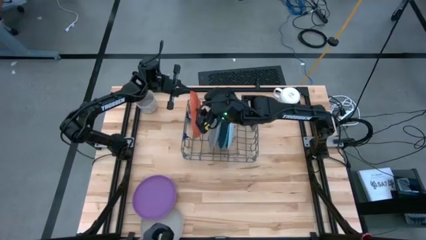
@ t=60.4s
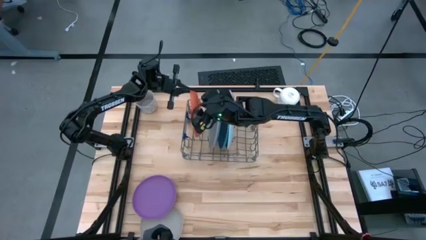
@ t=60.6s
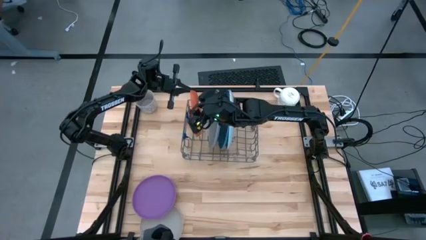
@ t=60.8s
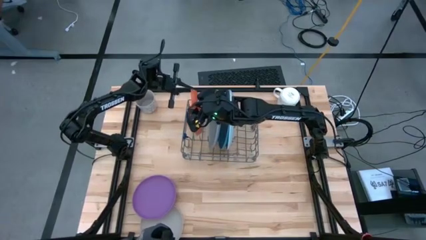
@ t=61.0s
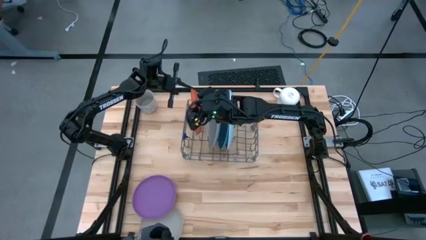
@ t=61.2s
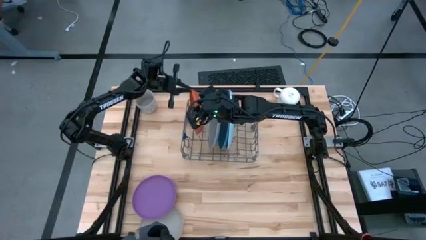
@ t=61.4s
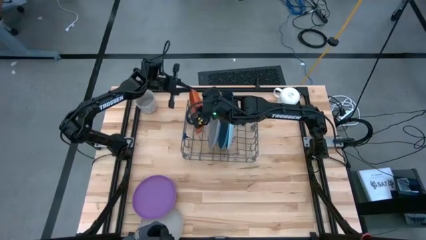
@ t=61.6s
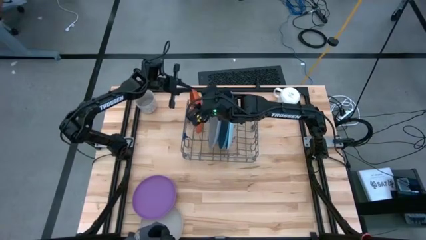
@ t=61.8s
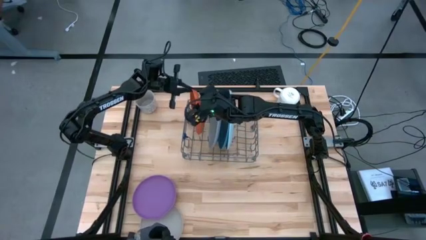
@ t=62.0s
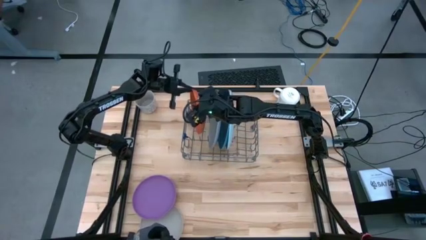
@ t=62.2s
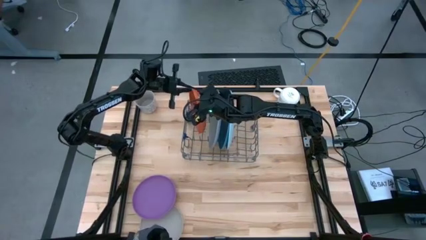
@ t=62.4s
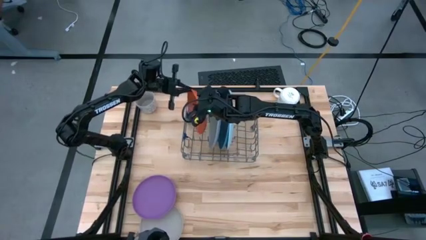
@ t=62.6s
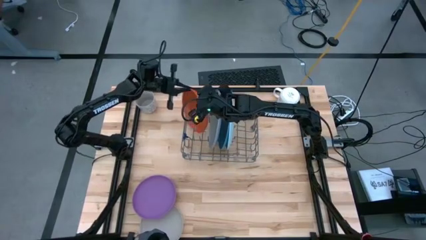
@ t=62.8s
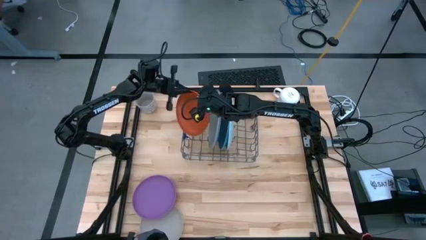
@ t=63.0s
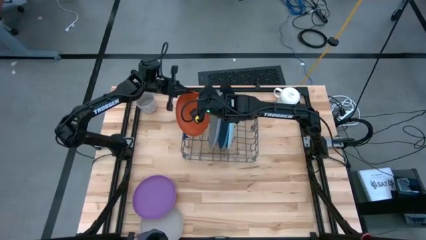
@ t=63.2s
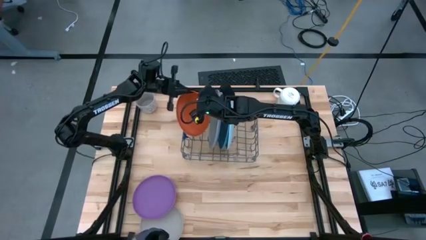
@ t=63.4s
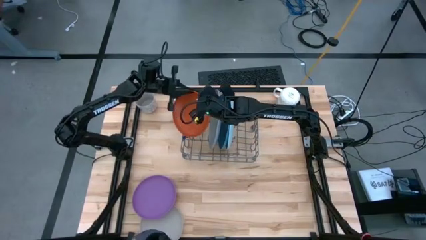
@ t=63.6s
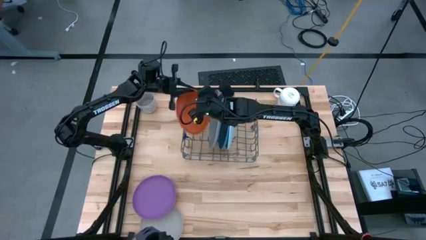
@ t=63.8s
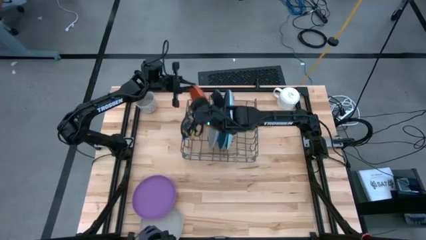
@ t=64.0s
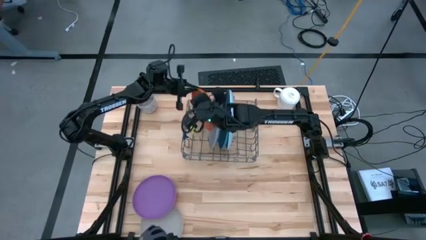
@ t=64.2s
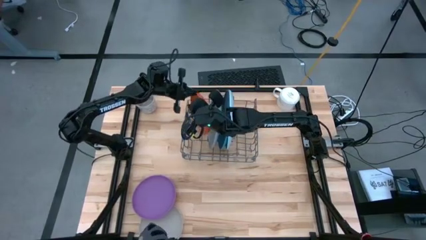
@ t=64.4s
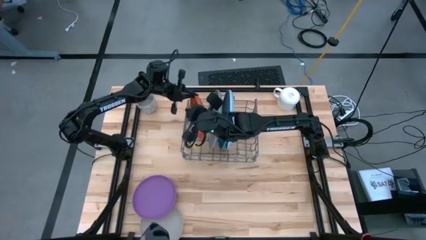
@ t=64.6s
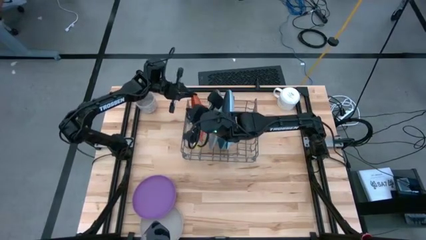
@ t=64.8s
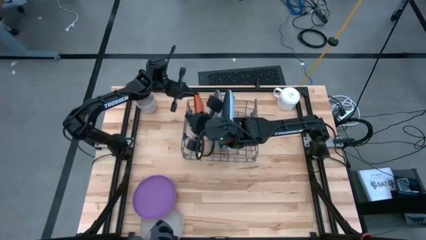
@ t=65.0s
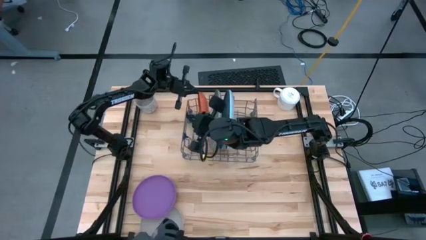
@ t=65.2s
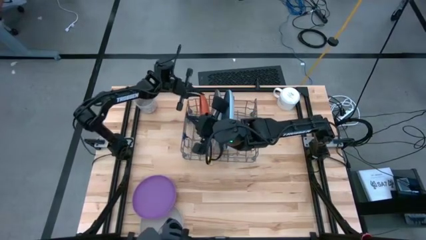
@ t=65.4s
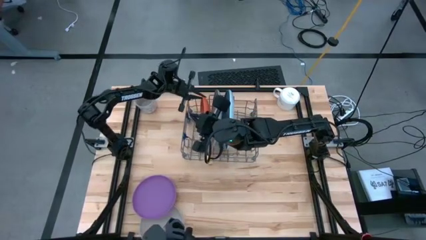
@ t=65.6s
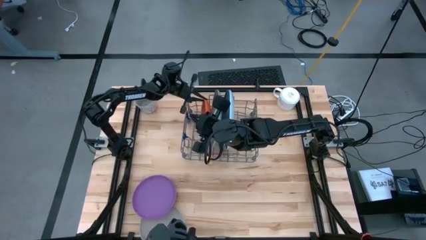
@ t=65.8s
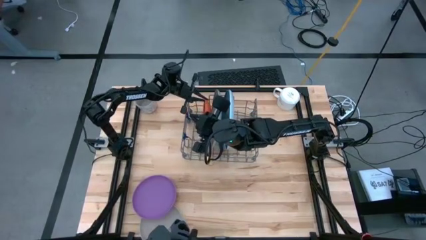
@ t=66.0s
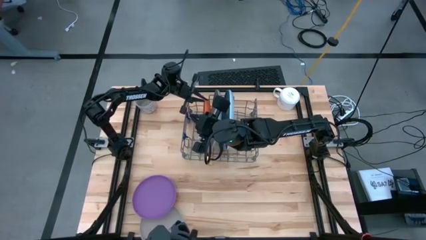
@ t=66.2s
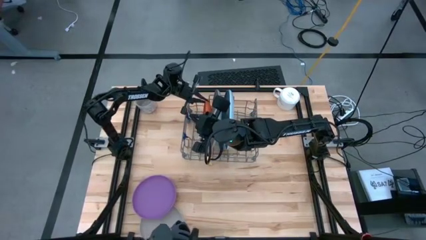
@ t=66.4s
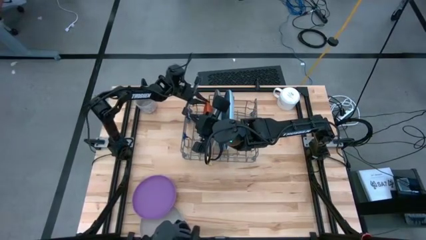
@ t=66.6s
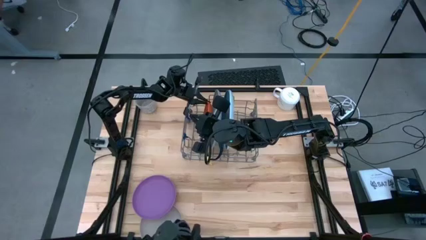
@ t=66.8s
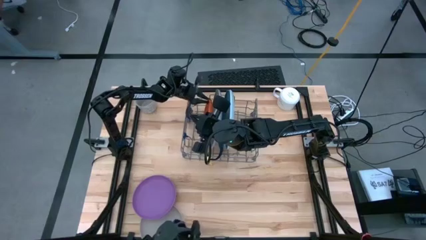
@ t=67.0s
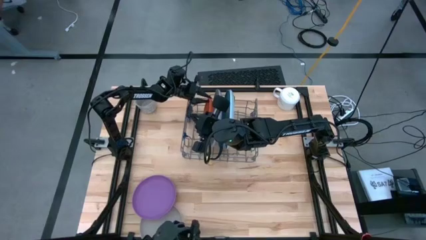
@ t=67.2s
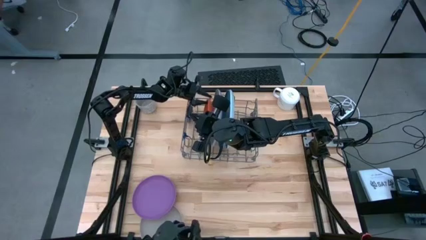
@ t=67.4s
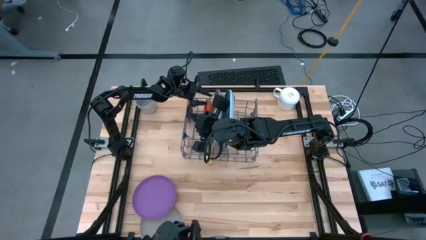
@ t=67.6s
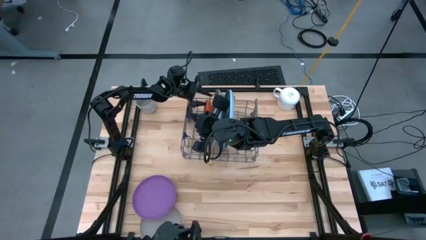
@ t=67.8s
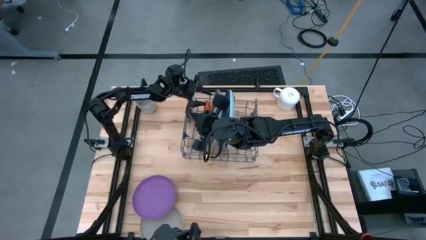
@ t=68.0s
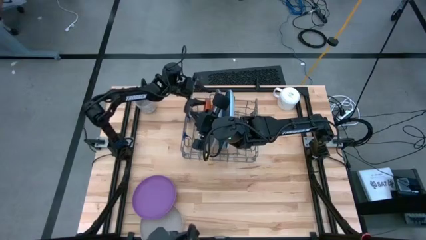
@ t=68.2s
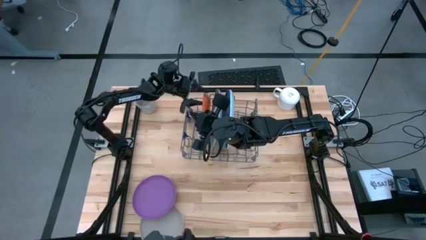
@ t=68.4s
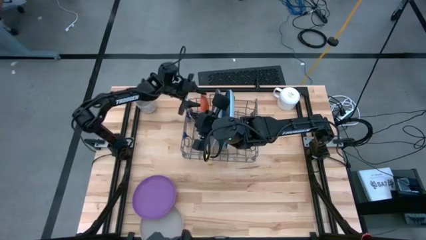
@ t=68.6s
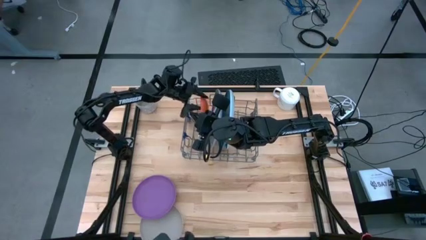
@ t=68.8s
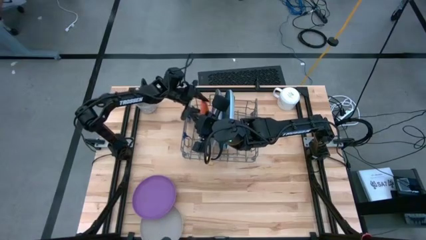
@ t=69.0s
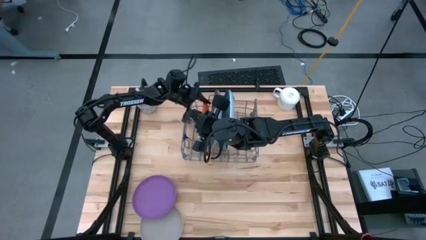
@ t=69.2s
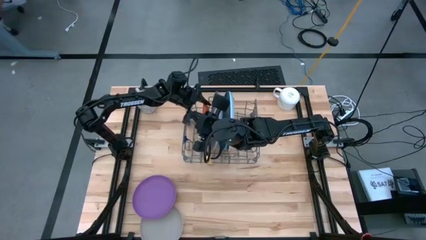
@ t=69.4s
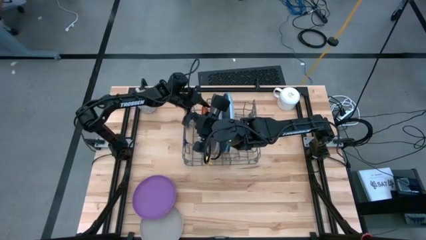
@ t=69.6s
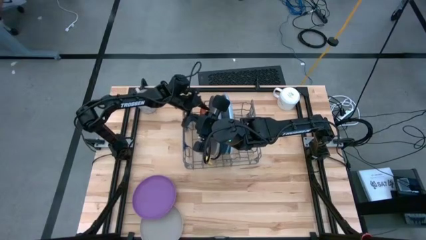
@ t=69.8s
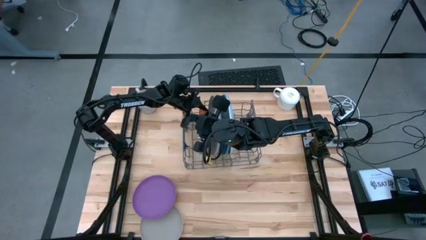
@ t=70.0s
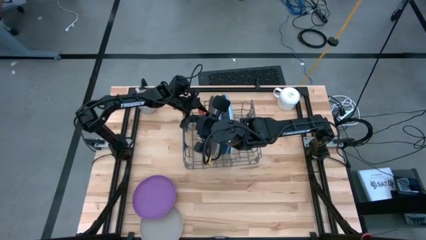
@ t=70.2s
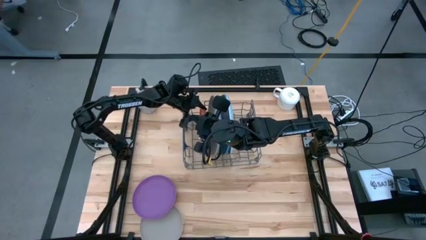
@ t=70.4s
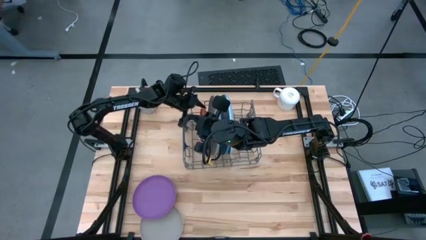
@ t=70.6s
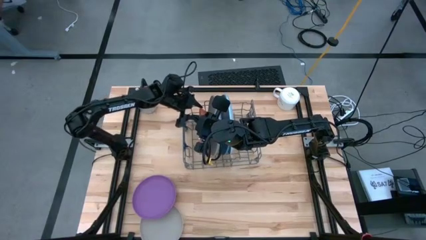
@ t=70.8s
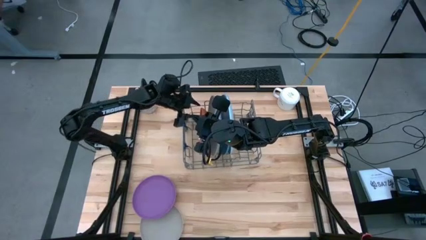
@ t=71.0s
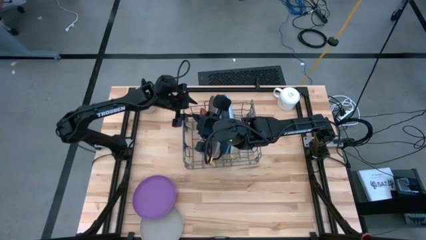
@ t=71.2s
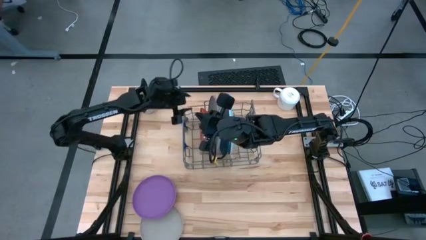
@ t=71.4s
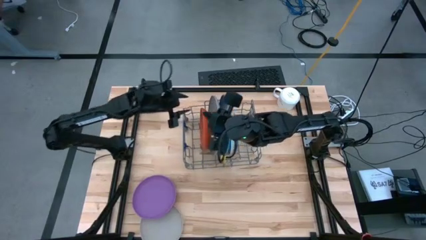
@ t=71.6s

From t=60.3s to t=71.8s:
Task: Sort dishes
Put the orange plate in the dish rack

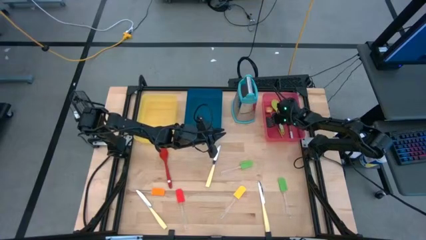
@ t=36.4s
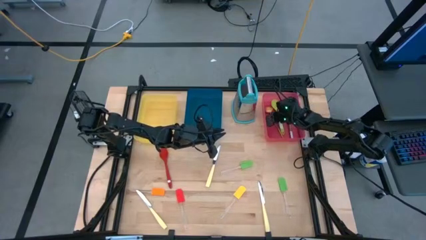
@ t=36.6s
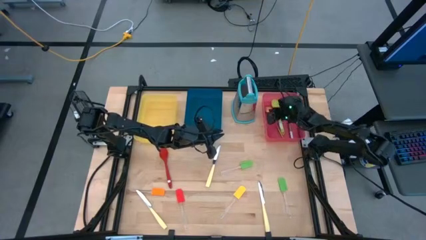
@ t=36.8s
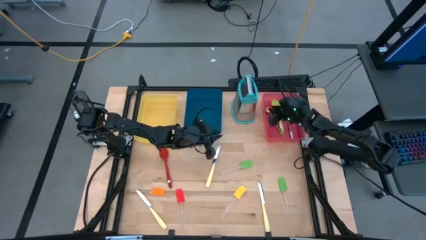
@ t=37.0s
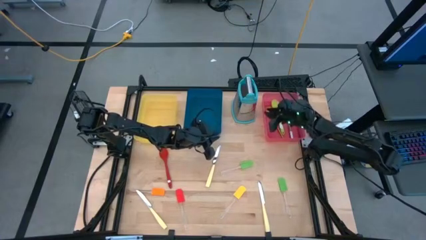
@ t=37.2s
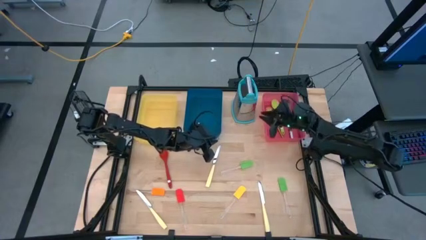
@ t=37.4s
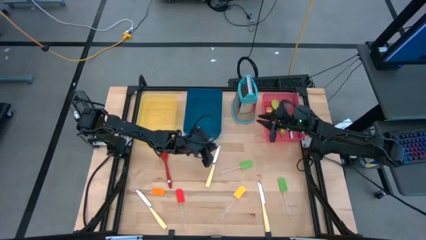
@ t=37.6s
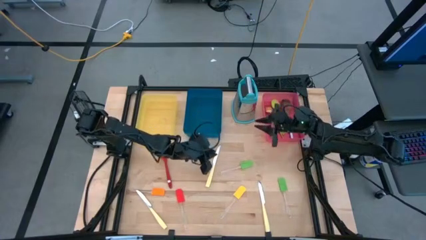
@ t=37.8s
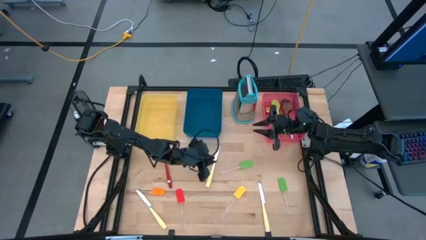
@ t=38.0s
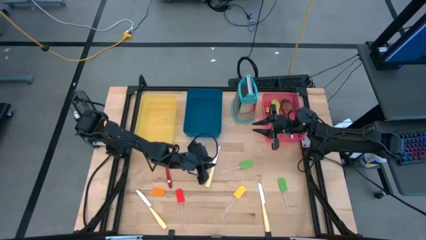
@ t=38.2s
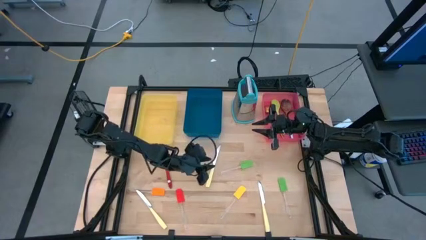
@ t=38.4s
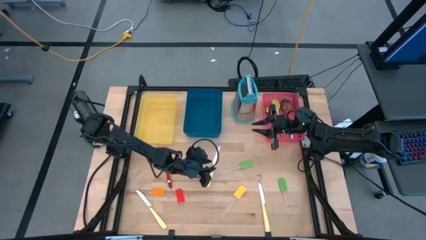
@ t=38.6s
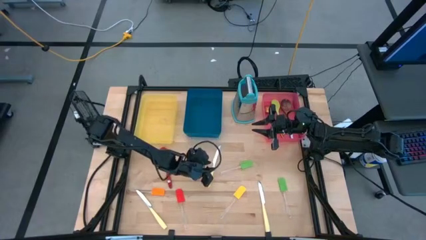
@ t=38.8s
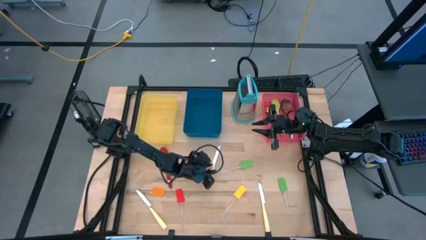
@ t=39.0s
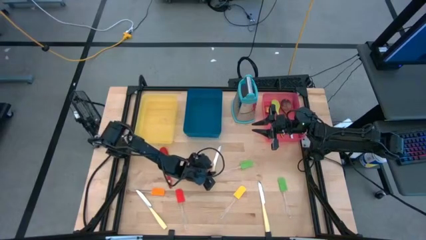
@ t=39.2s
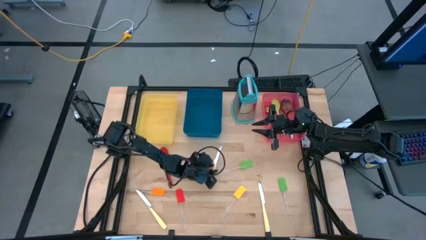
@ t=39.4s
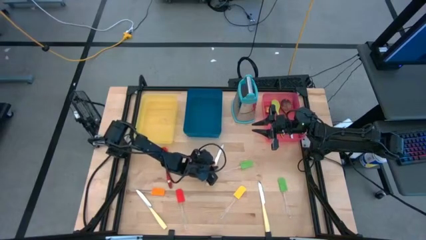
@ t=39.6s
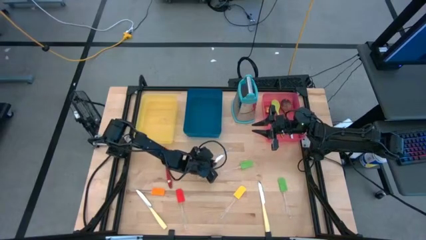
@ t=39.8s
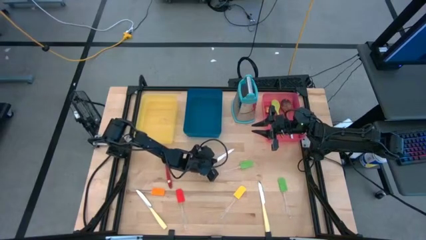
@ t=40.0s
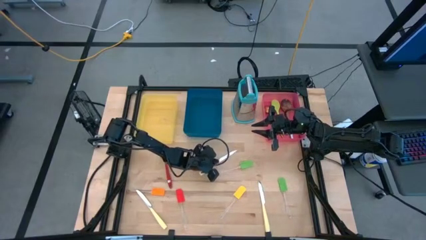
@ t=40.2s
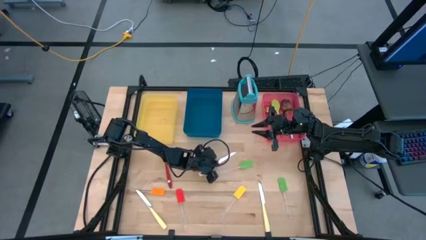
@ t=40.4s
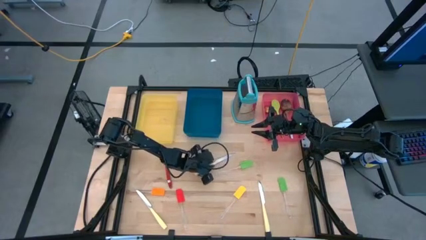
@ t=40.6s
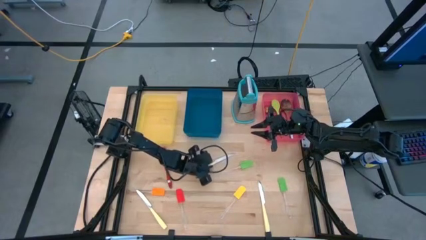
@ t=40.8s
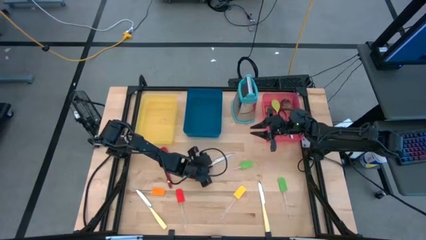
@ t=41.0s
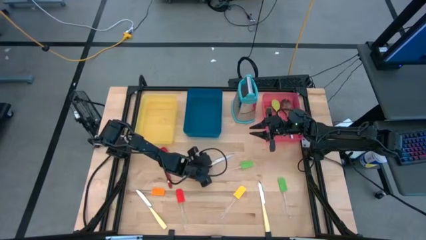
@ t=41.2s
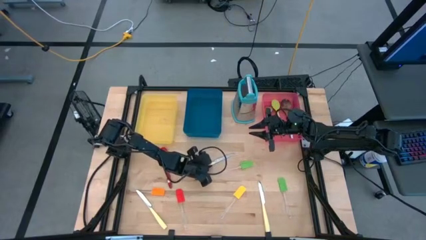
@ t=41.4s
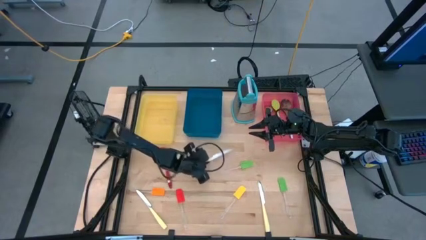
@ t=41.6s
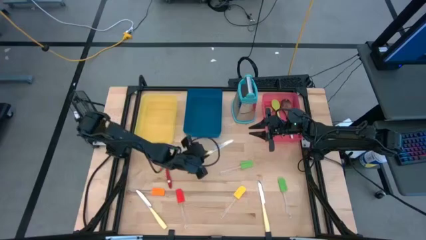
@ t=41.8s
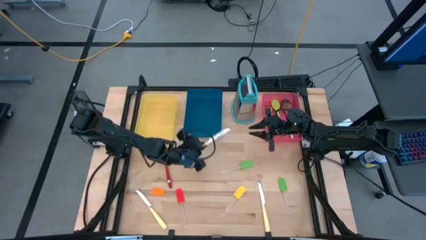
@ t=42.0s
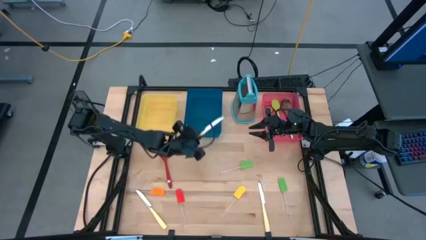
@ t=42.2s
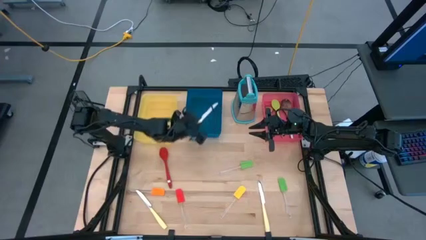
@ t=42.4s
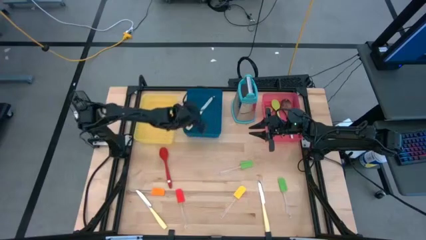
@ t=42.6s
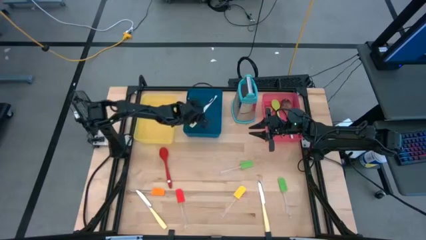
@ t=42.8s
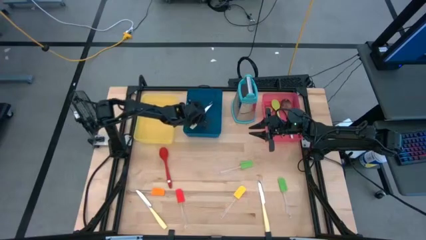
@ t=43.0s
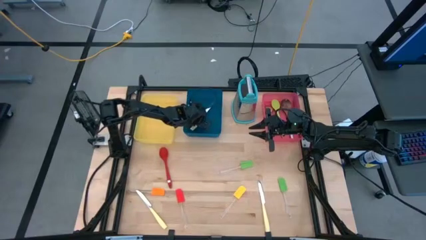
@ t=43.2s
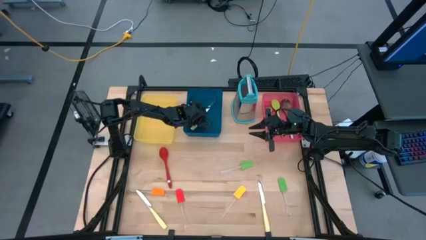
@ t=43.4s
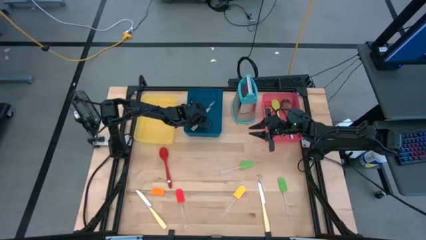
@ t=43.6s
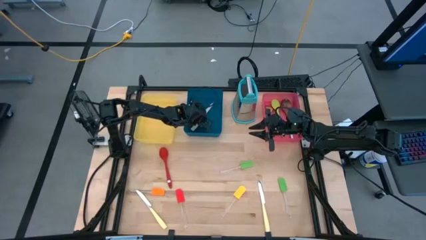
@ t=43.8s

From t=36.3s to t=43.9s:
Task: Pick & Place Kitchen Items
Put the top yellow knife into the blue bin
